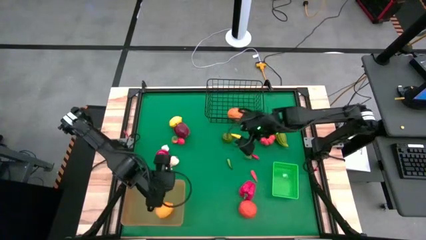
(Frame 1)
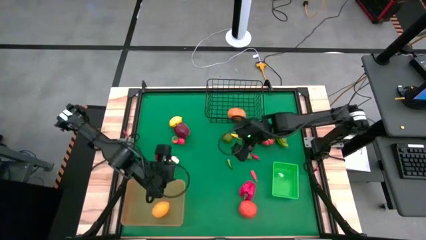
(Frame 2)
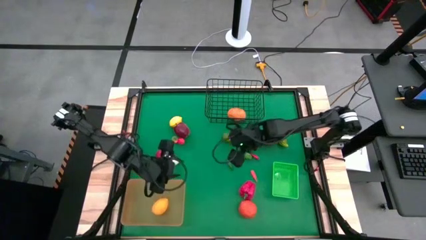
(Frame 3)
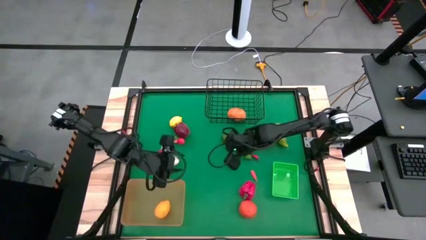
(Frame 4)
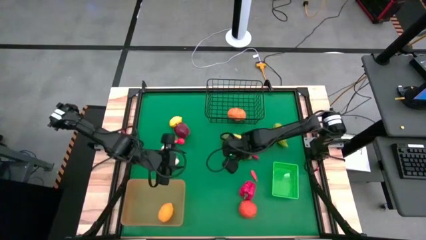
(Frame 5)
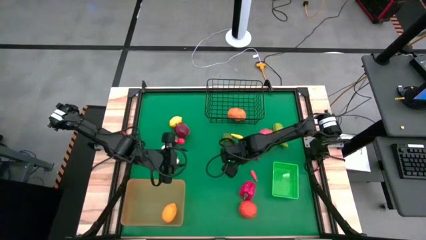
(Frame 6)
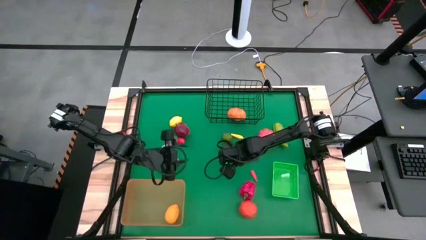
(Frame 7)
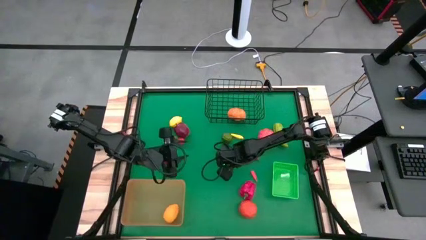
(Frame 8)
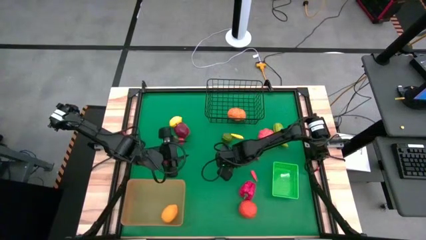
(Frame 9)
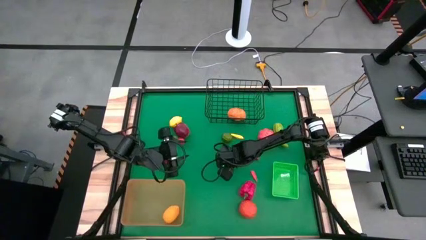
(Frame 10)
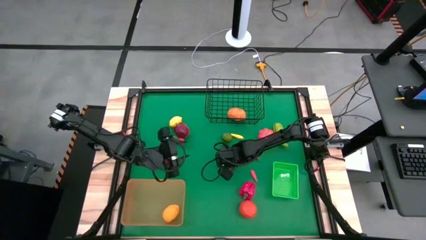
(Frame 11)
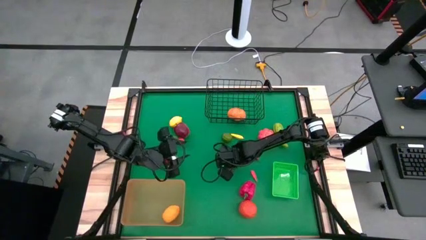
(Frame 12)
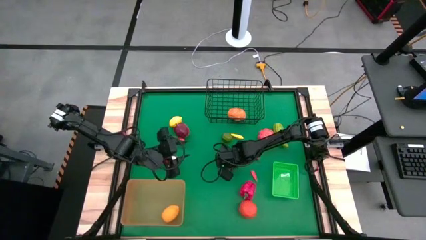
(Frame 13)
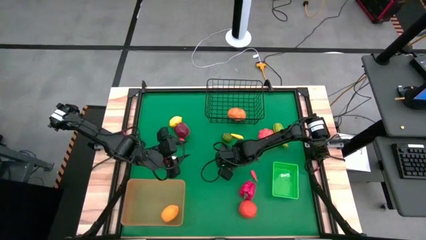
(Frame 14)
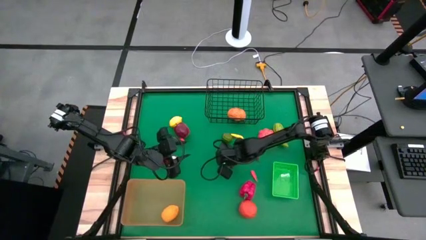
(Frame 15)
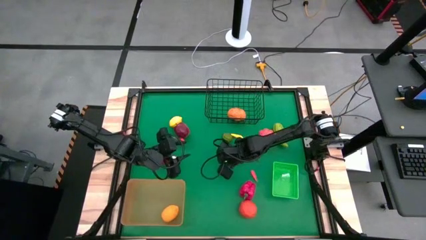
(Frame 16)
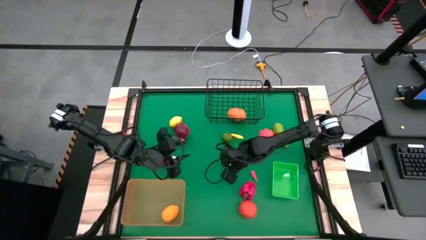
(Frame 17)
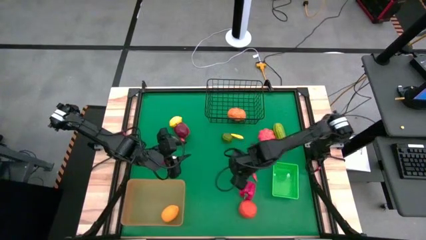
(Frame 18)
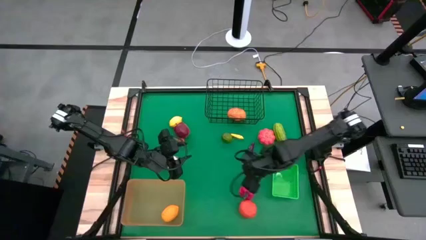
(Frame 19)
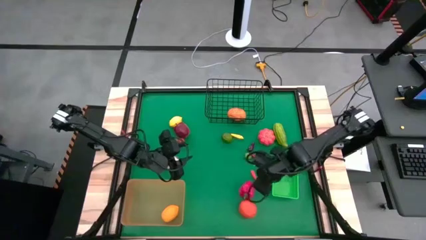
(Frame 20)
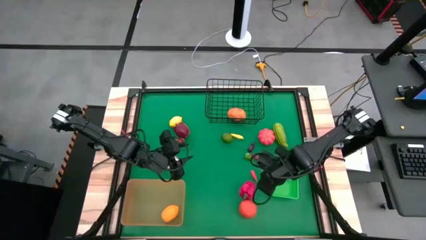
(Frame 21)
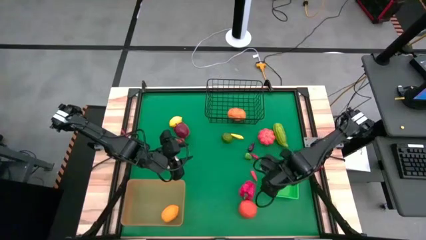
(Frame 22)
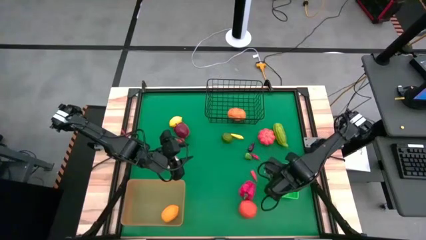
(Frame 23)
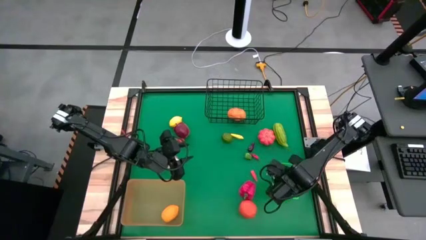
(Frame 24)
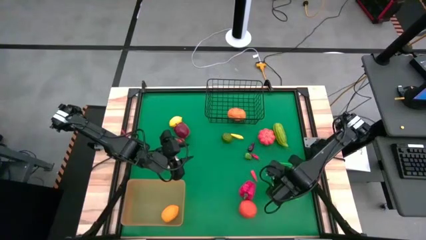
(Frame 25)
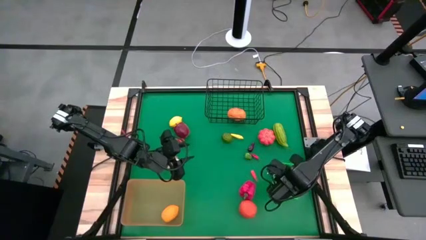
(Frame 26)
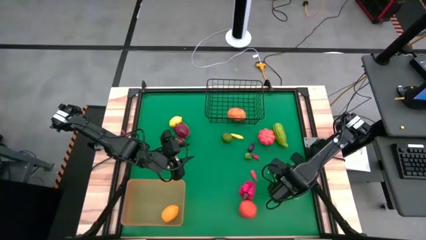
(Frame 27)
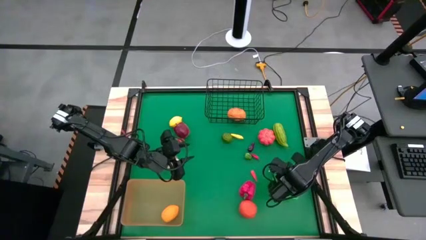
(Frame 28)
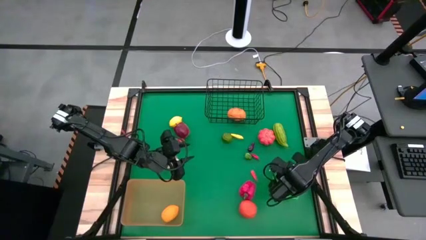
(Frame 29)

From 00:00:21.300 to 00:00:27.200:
Task: Sort produce into baskets
Put the green chili pepper into the green basket

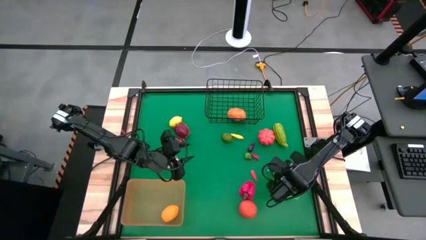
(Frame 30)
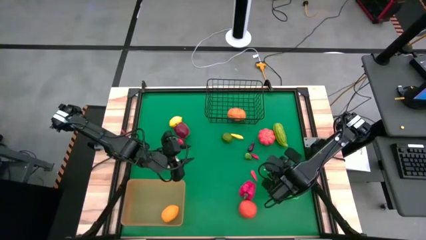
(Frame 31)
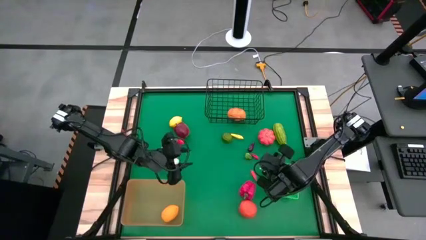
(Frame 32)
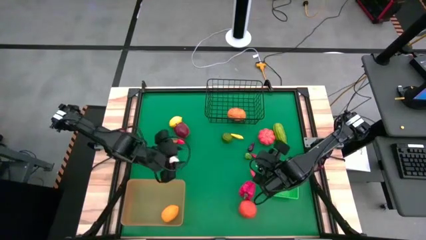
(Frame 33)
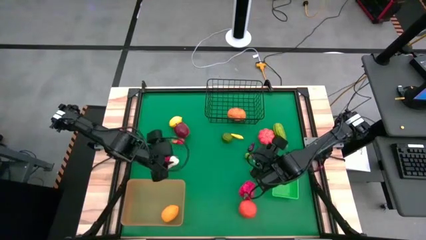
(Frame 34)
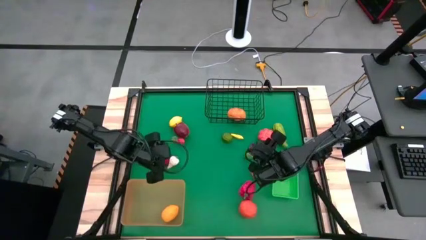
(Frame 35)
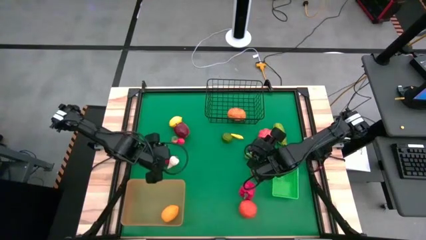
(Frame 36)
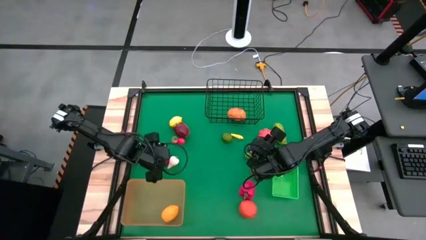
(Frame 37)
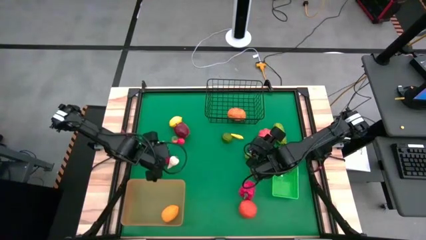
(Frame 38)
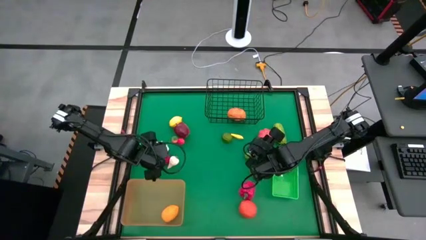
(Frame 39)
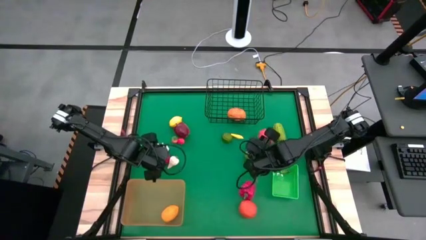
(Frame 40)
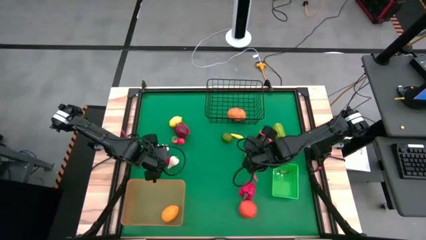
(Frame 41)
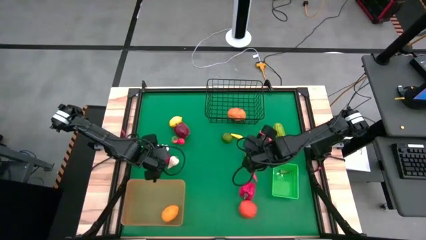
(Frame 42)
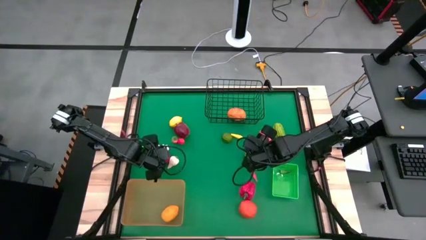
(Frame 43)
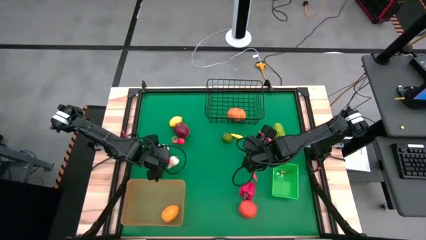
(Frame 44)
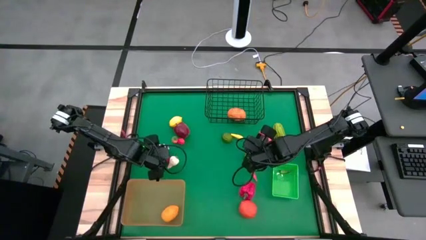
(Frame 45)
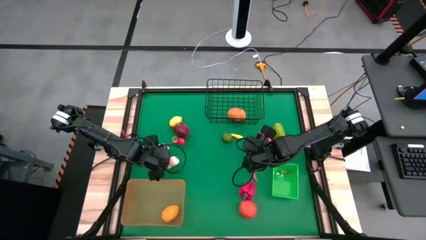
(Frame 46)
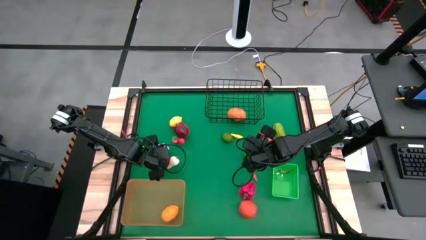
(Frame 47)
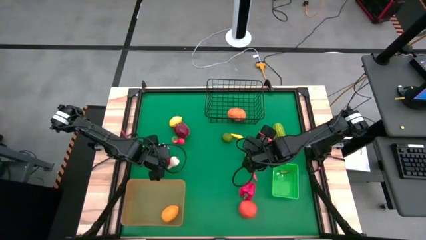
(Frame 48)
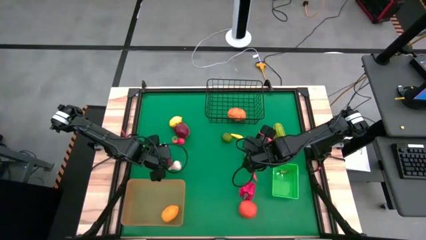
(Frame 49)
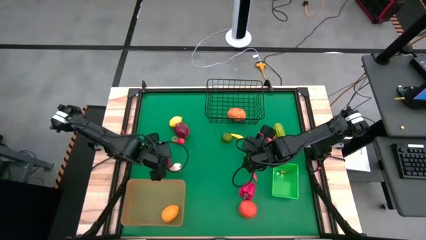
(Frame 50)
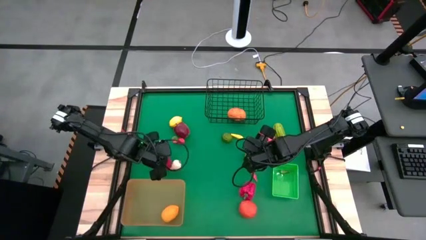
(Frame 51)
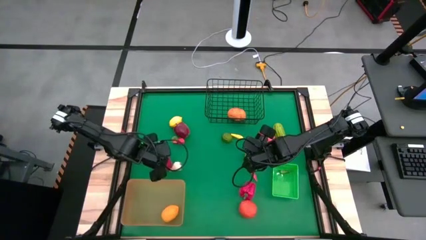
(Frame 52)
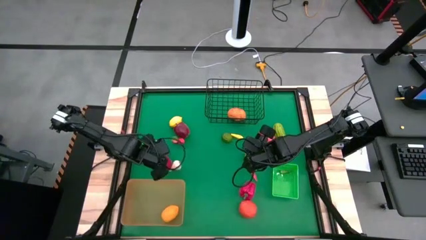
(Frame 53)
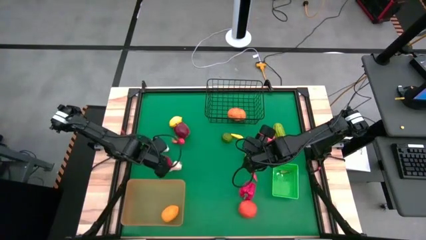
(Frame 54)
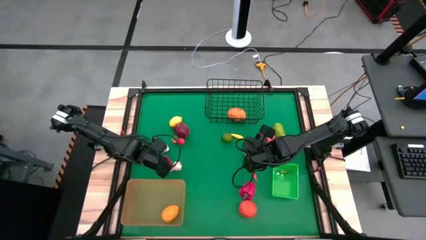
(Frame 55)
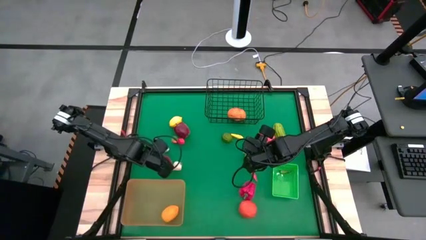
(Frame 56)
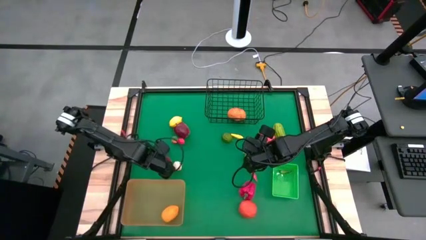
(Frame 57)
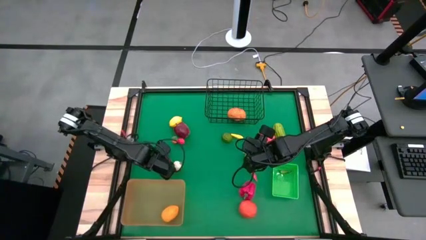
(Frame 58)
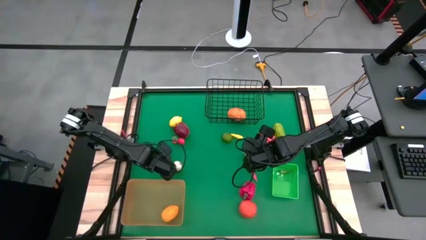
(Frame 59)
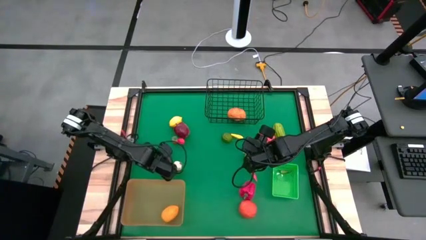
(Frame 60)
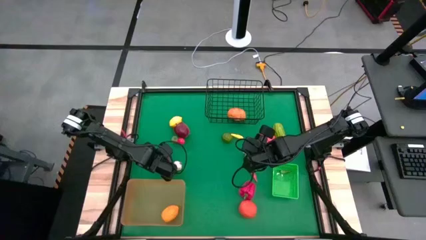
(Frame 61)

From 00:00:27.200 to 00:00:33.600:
Put the tomato into the orange bin

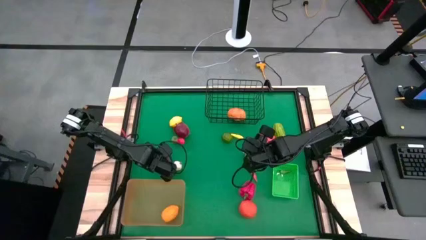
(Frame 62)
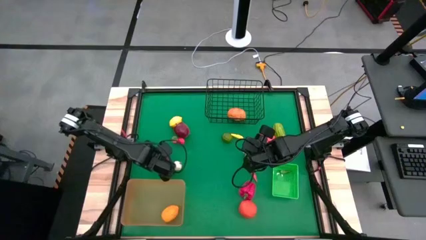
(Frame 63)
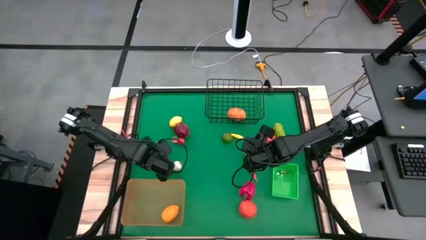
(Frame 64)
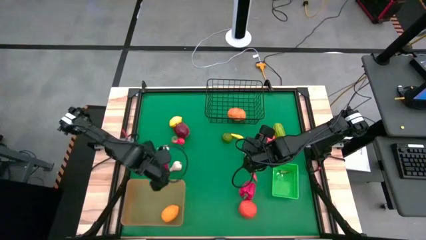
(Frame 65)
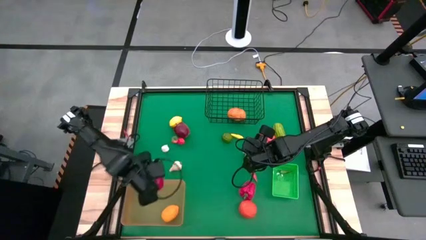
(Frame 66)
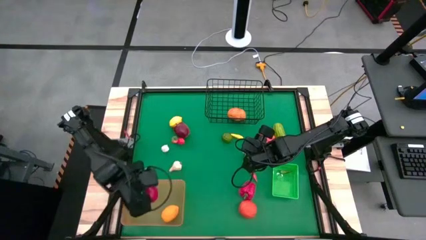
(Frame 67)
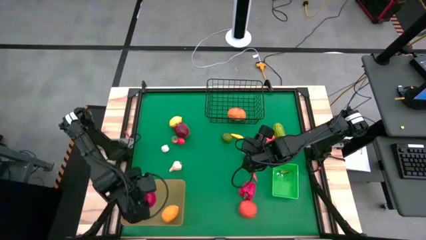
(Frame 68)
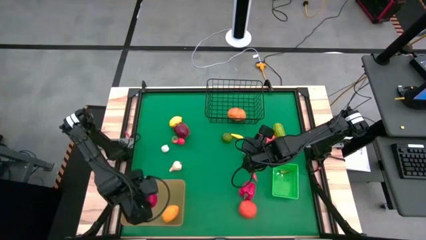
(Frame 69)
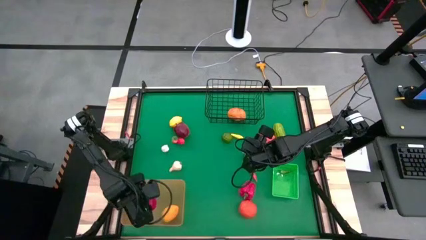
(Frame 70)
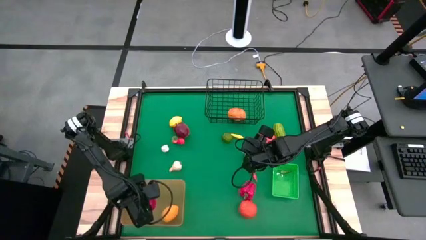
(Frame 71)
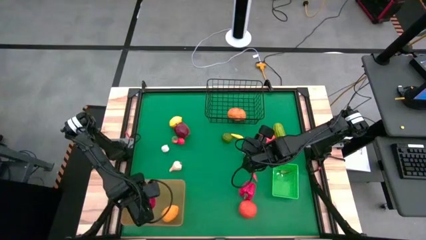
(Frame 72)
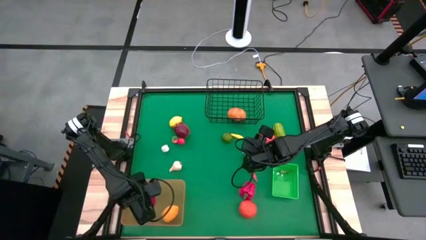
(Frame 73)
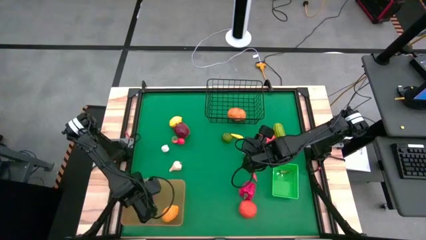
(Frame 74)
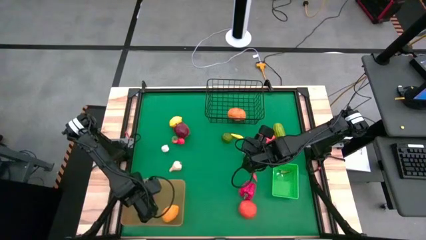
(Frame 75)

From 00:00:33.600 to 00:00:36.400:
Put the tomato into the orange bin

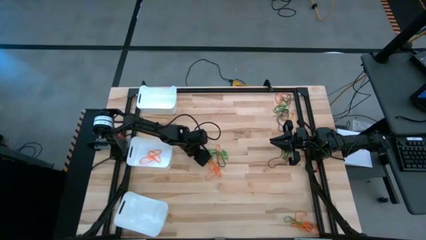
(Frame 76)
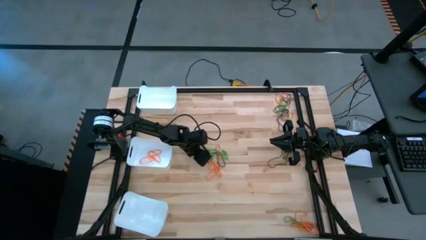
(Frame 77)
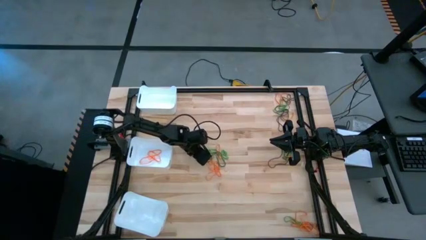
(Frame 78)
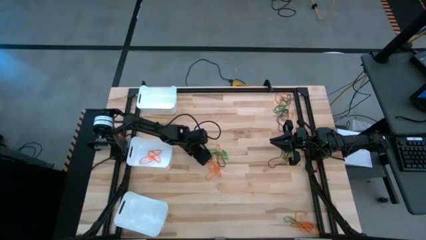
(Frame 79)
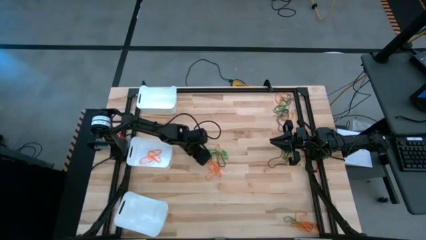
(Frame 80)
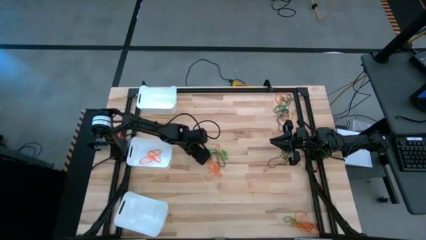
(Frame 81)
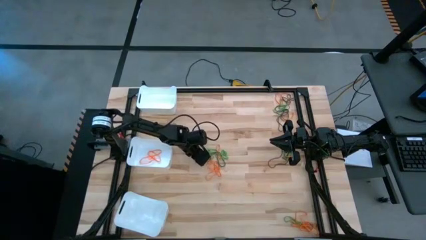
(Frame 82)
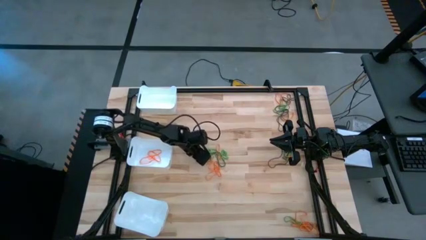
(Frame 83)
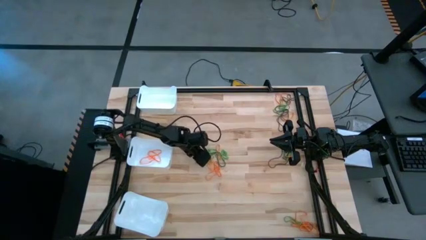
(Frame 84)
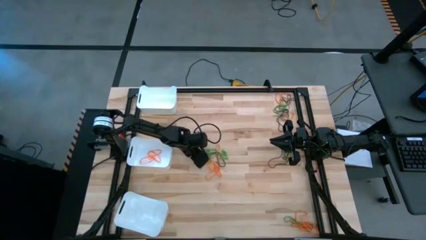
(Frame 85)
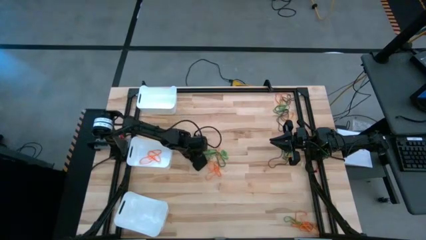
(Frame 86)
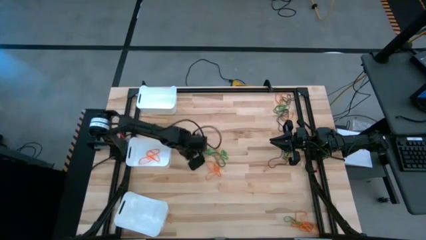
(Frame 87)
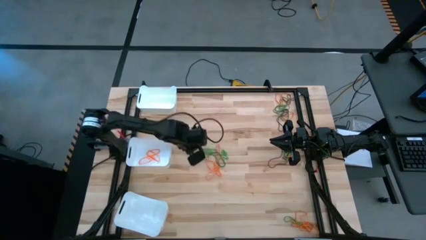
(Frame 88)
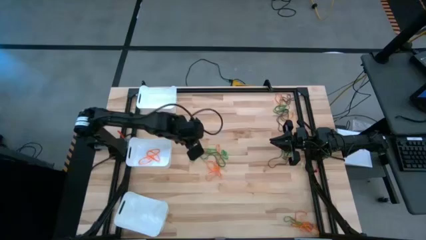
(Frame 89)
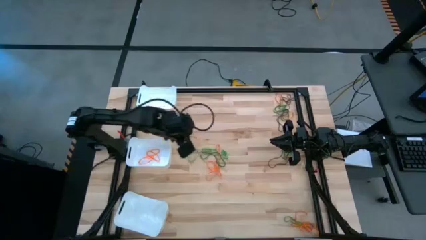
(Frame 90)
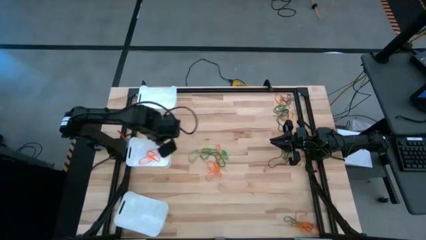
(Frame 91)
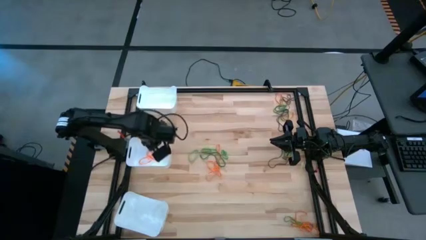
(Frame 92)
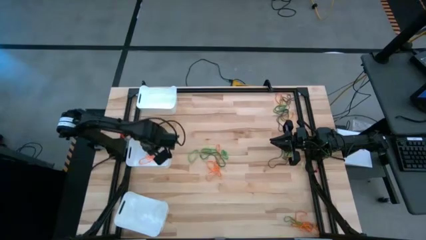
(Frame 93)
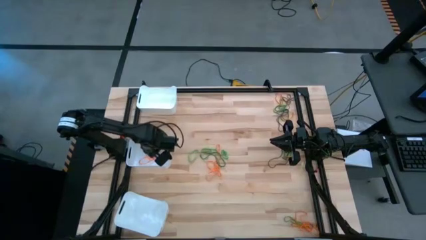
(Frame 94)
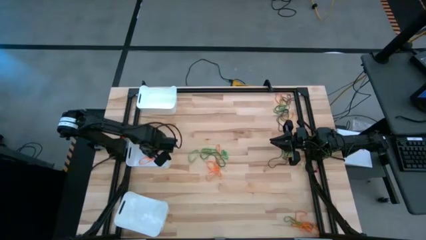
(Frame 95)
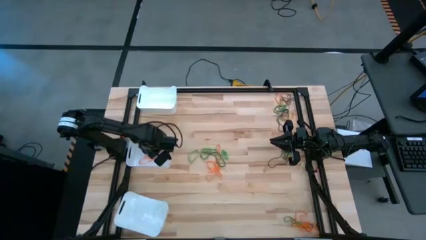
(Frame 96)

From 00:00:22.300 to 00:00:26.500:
Task: Sort rubber bands into baskets
Put the orange rubber band into the middle white bin
